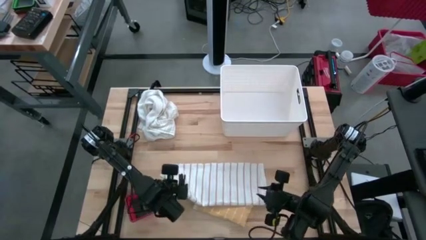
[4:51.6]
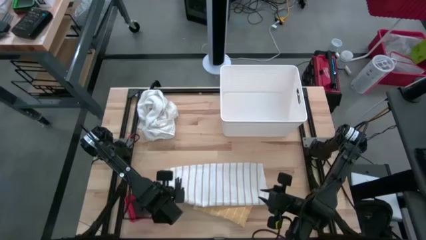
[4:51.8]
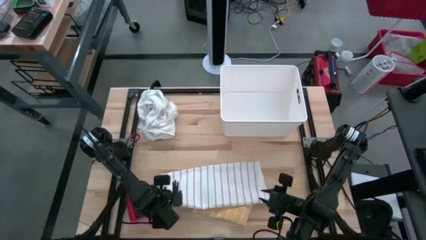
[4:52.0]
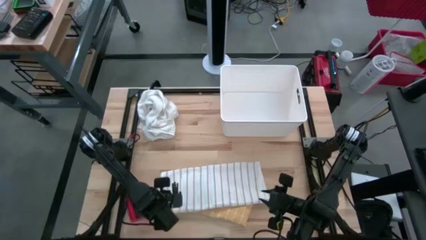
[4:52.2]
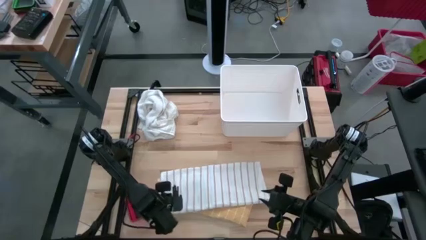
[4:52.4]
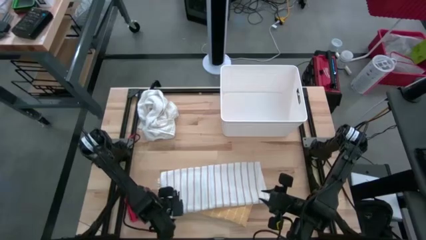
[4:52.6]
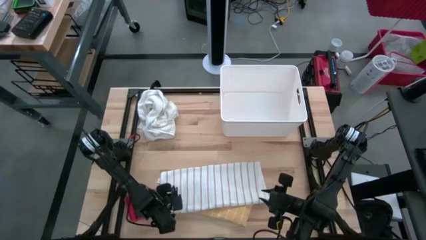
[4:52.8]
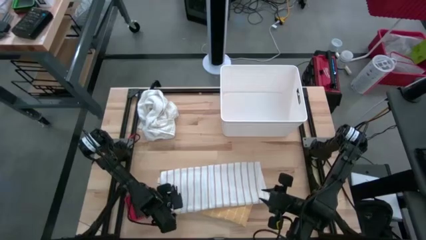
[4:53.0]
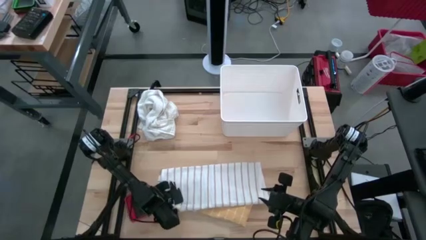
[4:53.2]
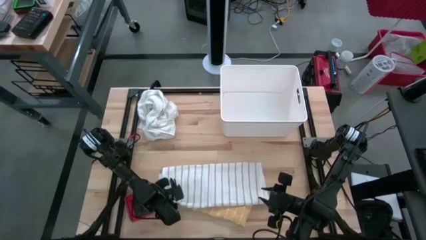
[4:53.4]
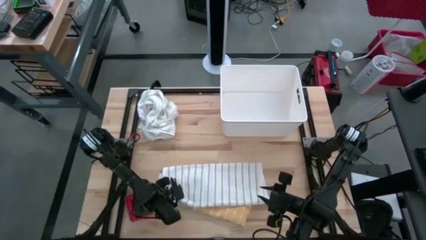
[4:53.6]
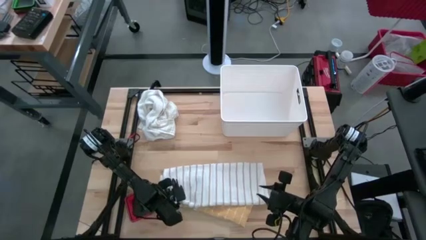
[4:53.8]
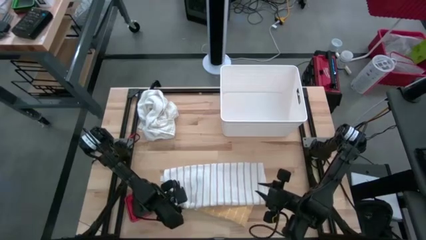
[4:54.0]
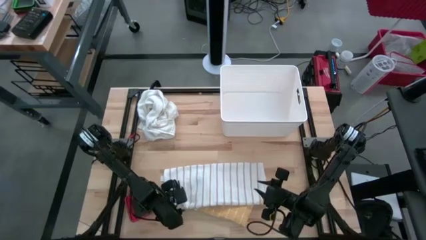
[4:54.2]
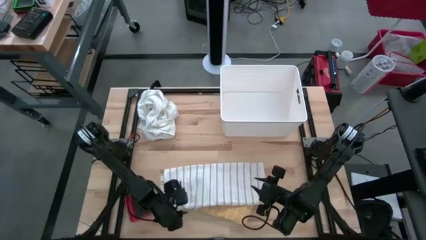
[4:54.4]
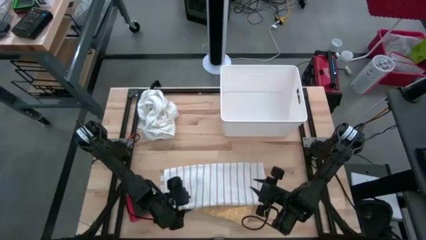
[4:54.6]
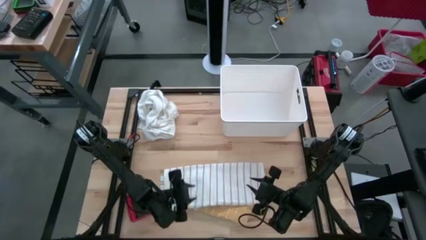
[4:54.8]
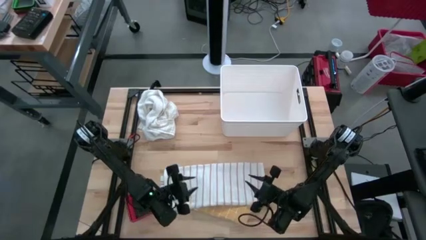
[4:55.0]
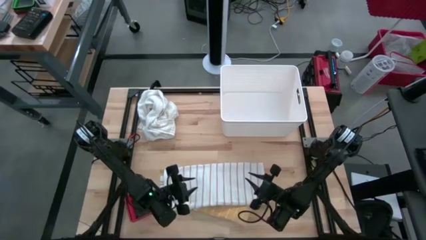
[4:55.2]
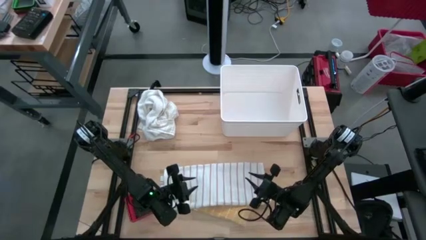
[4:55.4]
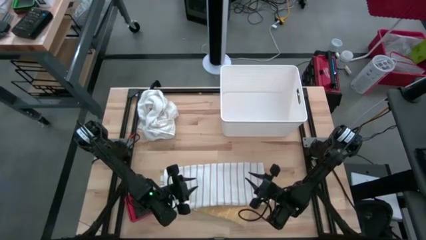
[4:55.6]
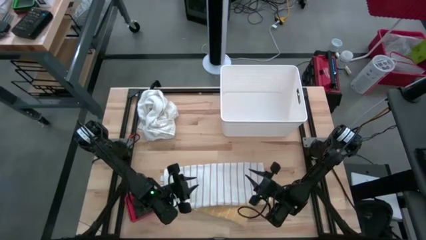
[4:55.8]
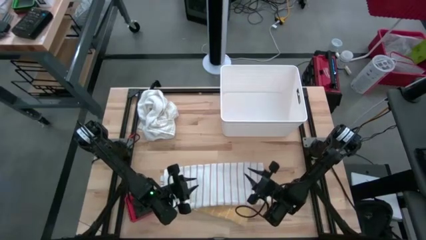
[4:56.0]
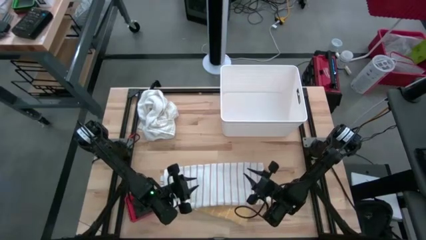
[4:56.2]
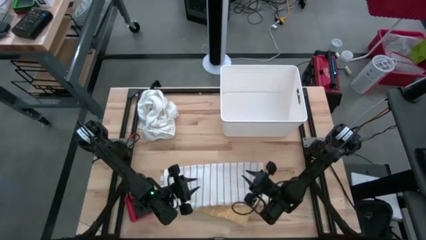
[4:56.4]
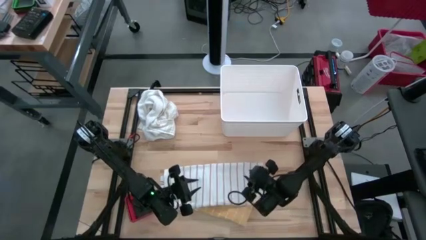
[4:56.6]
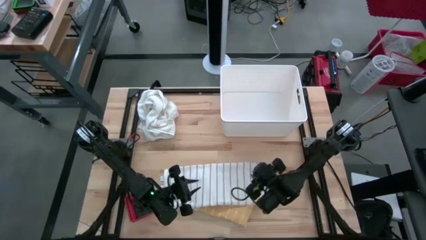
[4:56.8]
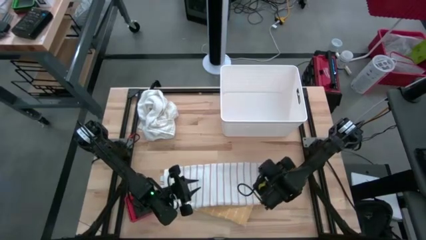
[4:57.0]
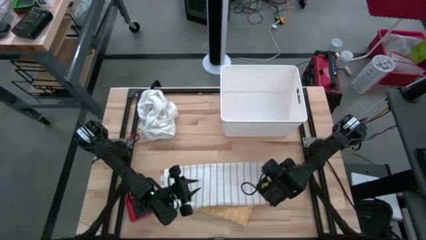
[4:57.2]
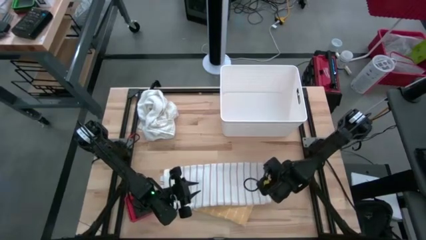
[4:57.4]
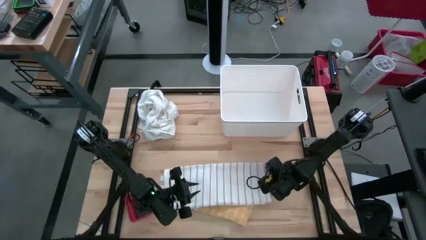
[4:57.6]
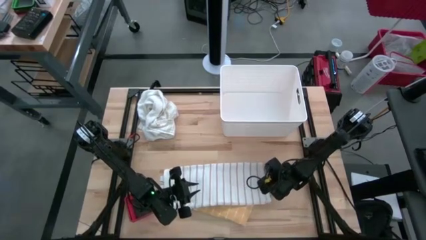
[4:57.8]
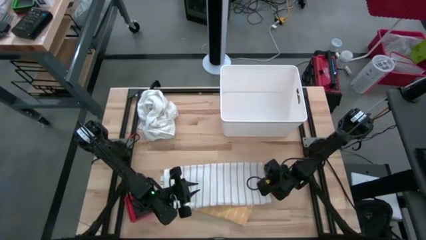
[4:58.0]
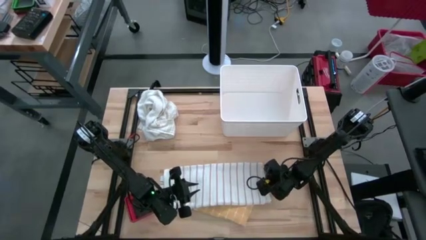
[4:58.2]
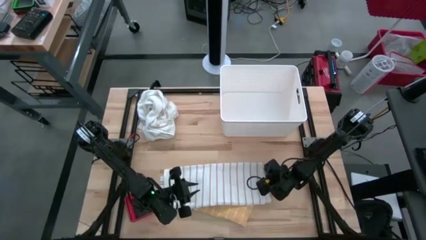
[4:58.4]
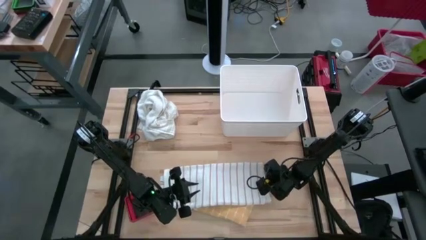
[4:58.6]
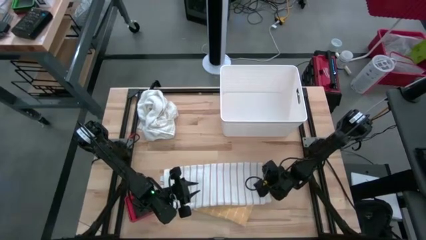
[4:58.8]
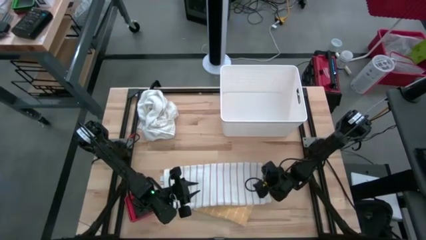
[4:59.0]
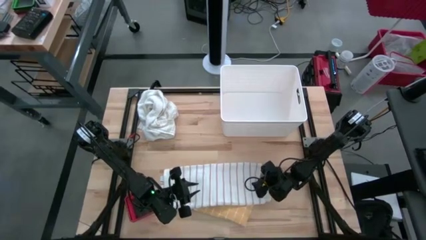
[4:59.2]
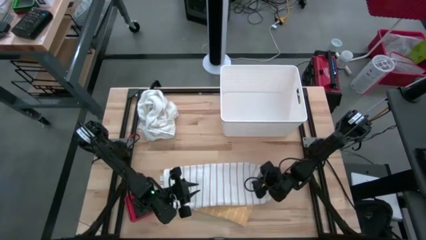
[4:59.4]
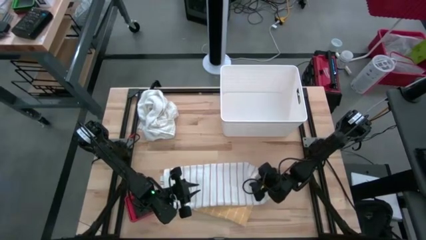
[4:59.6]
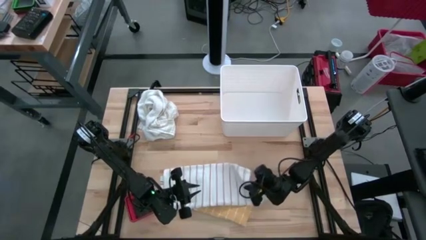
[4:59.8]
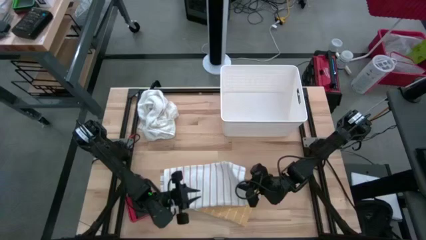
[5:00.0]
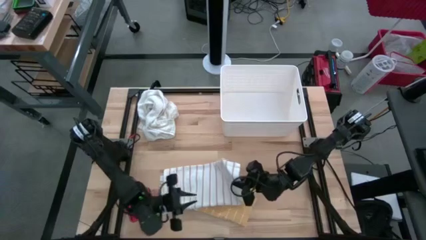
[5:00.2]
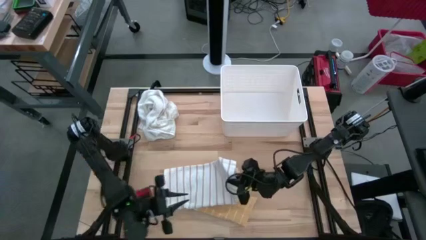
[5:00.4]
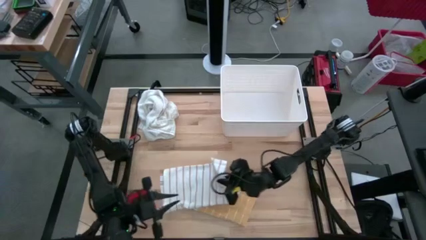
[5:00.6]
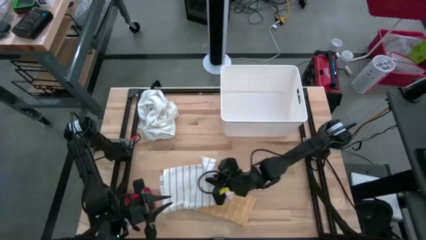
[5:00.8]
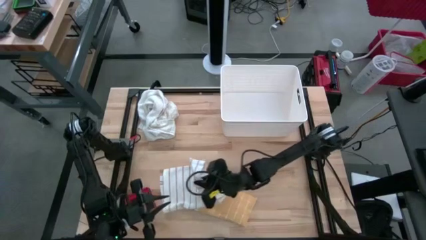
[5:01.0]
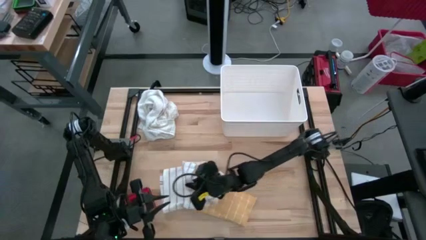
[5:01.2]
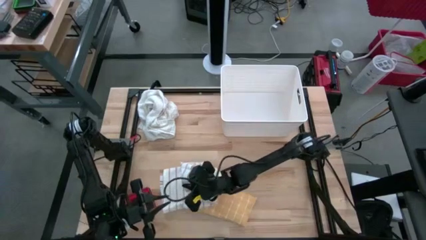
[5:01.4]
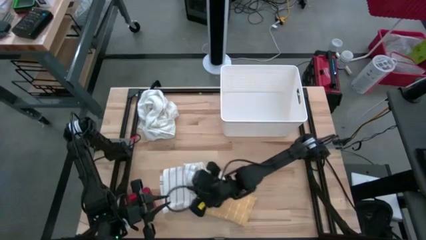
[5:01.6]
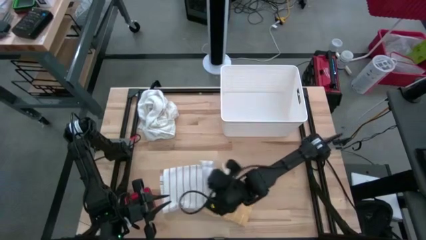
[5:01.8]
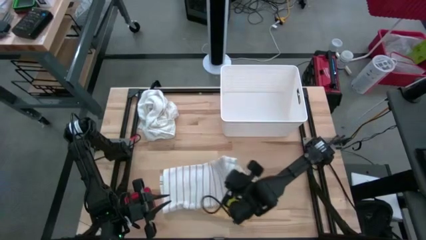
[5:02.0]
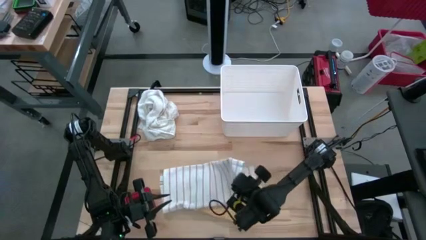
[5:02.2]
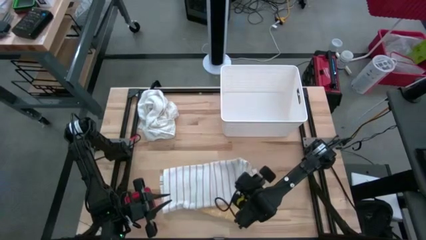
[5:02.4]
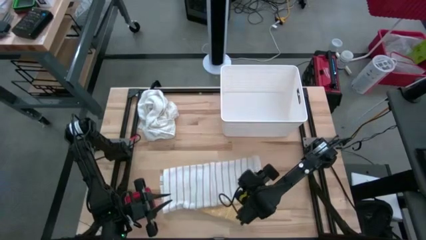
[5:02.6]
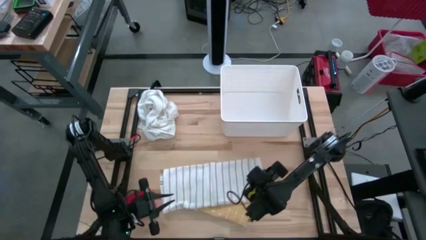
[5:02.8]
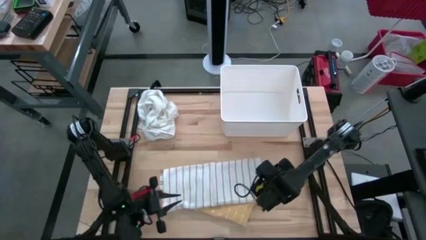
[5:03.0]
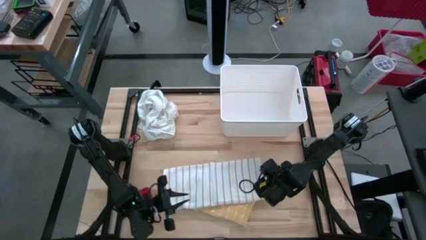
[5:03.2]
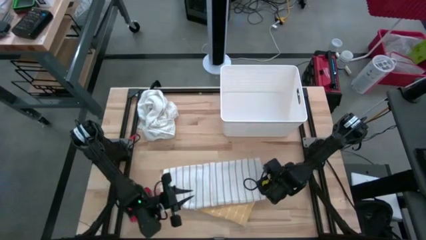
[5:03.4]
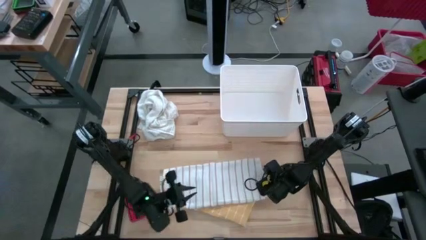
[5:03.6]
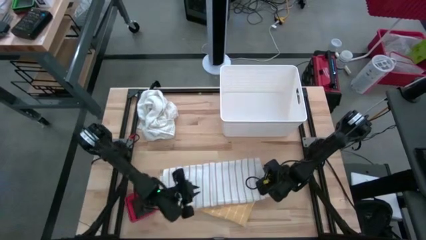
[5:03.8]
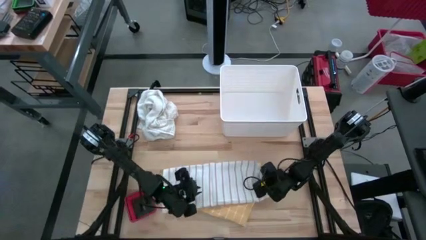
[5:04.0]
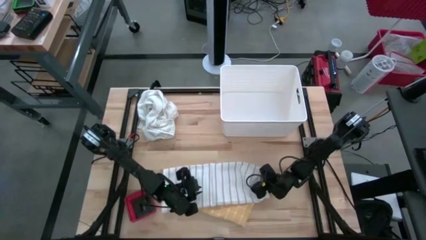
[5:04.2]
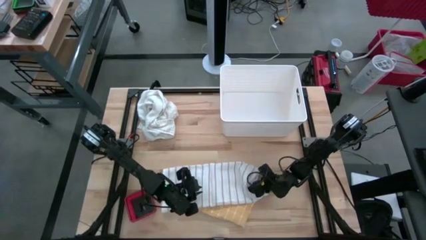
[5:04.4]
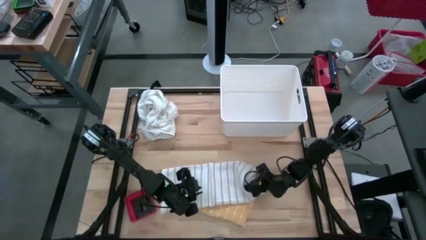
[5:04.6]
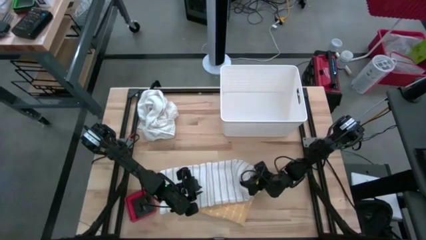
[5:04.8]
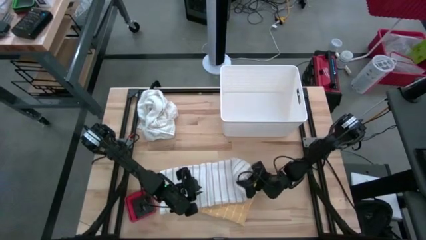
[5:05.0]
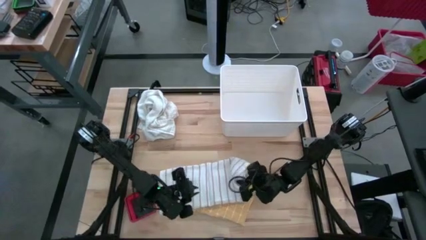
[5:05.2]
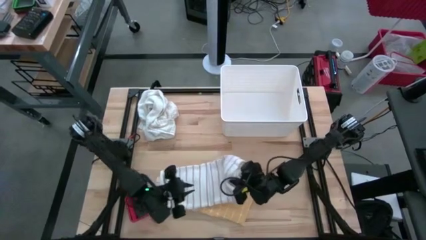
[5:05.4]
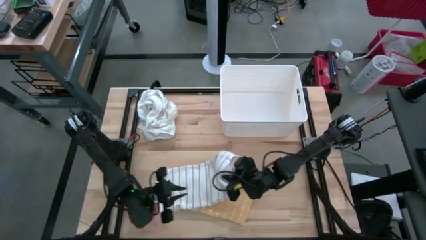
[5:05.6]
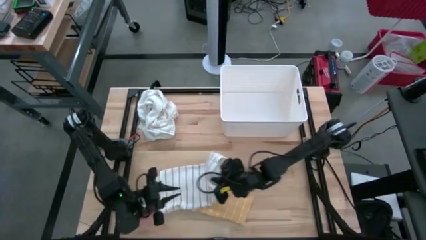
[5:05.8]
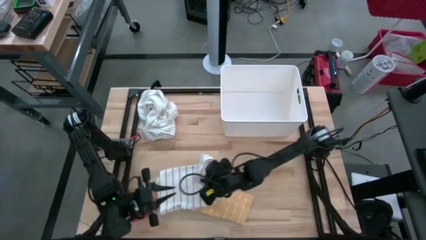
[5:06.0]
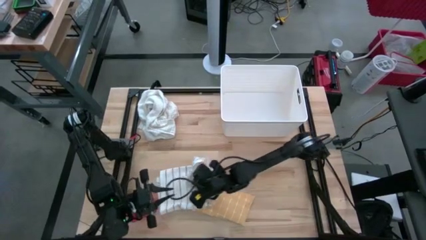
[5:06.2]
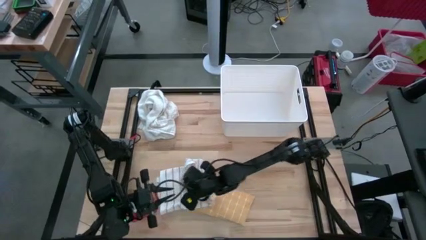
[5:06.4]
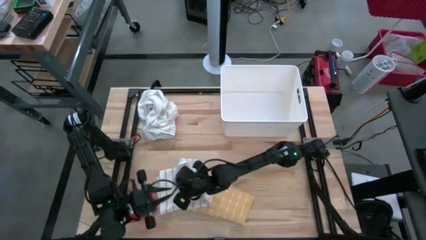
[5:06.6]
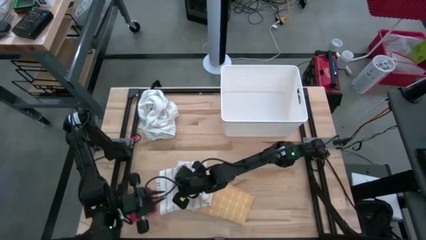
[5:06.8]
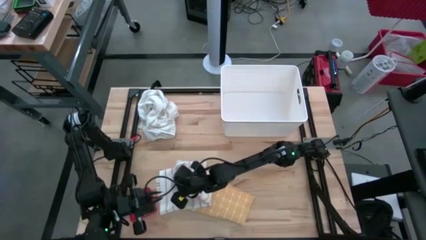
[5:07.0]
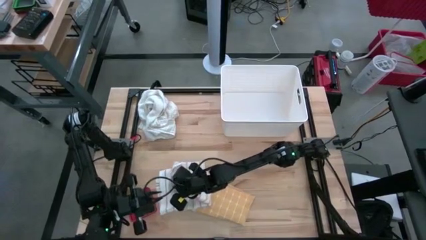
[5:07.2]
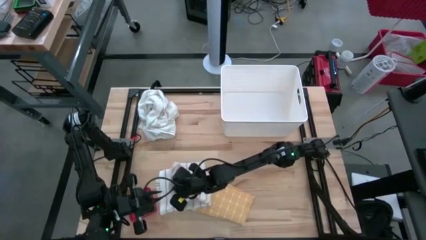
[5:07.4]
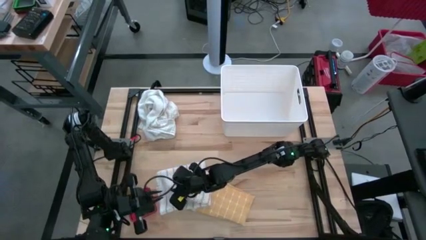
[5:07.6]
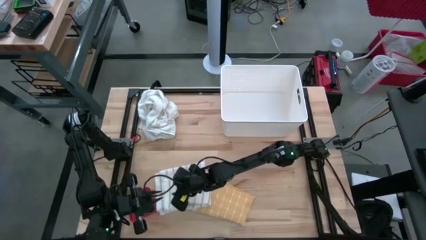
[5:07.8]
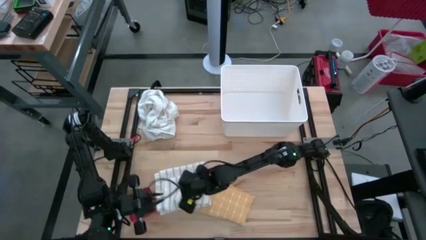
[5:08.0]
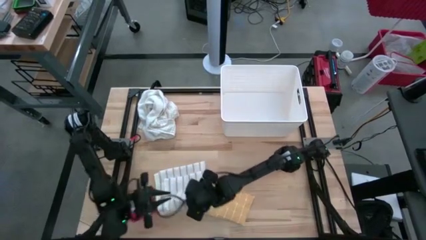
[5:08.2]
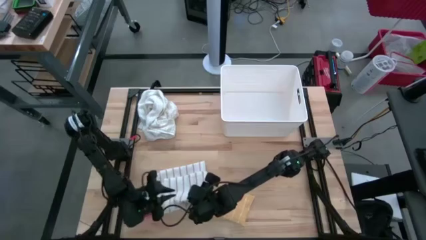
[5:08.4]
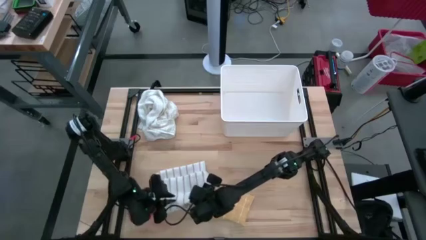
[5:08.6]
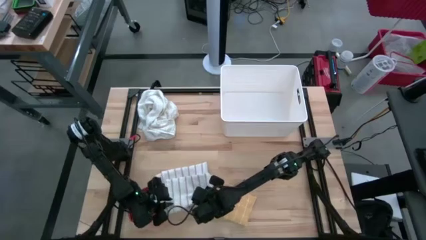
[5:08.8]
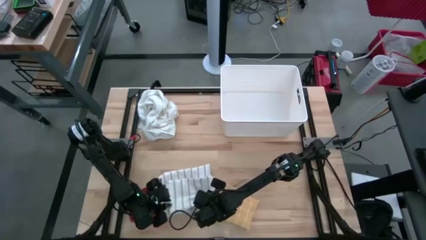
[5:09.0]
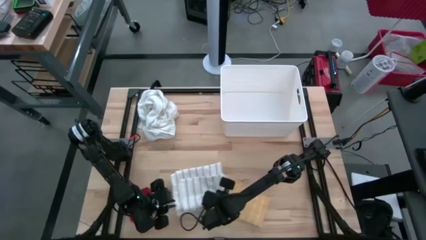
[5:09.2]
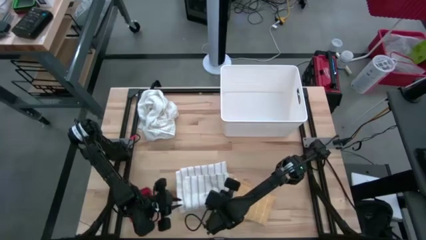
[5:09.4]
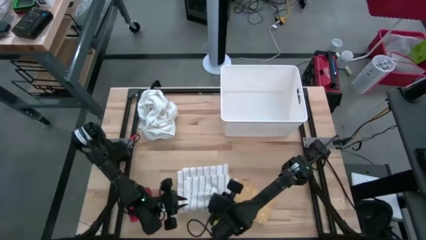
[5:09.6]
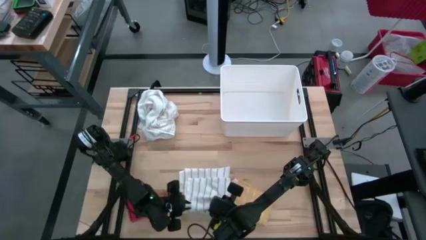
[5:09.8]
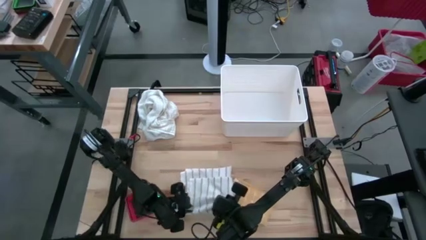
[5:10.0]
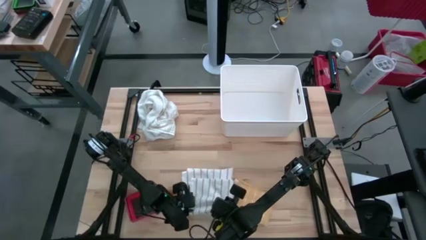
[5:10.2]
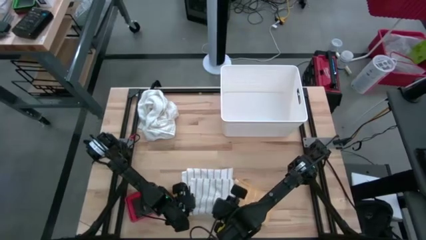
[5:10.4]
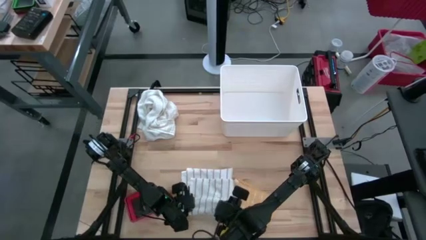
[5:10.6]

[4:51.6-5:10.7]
Task: Fold towel
Fold the white kitchen towel
